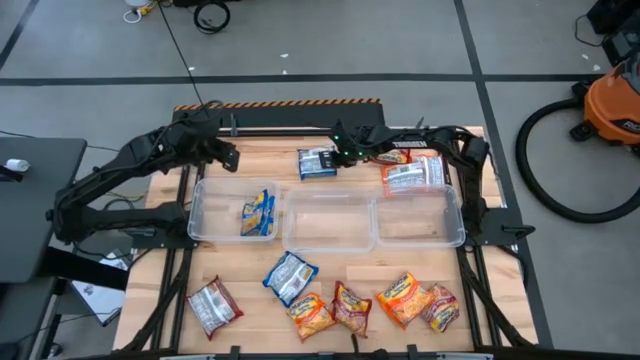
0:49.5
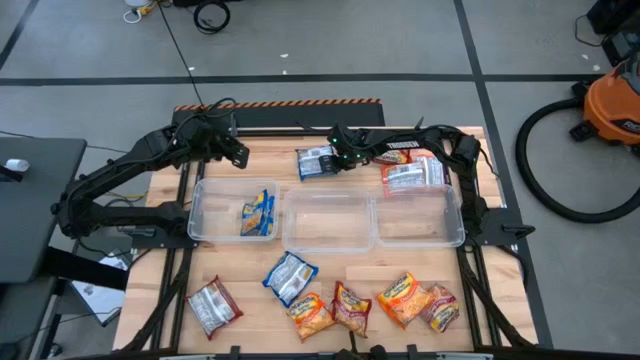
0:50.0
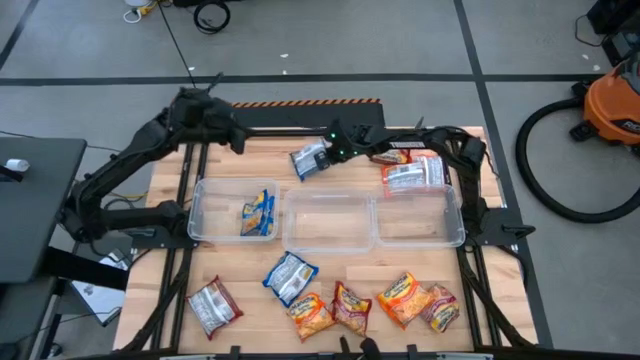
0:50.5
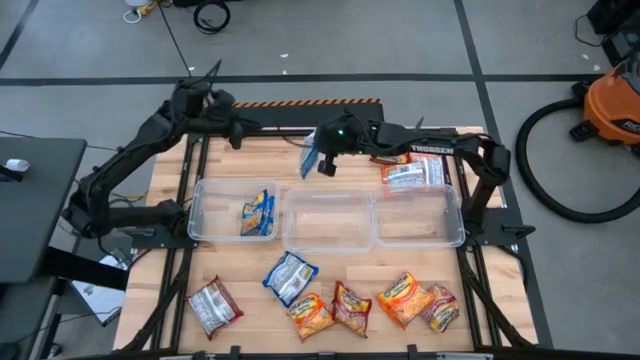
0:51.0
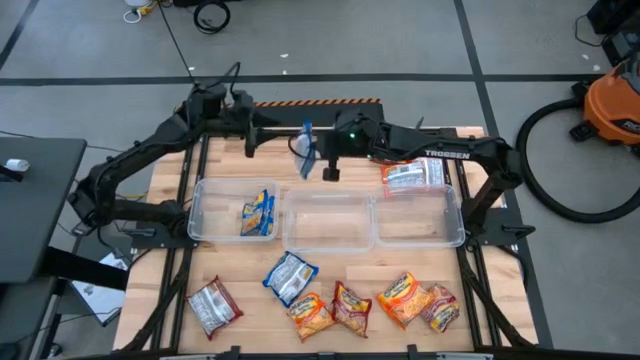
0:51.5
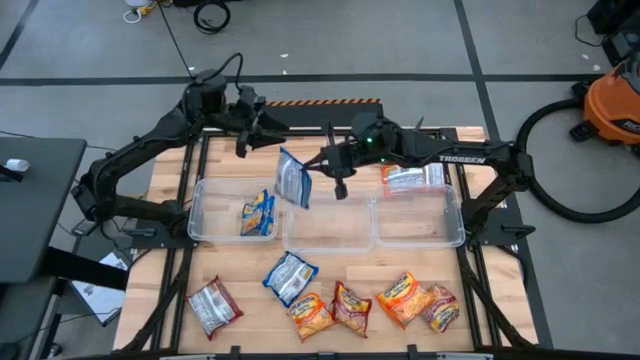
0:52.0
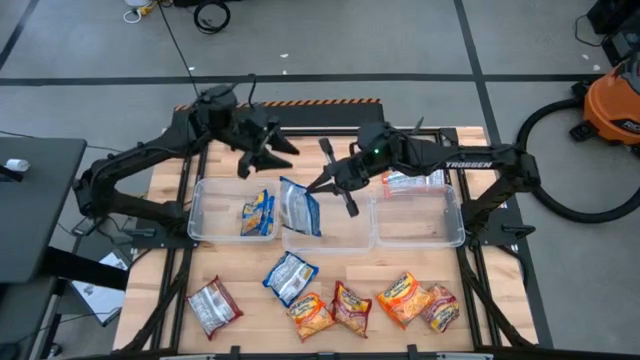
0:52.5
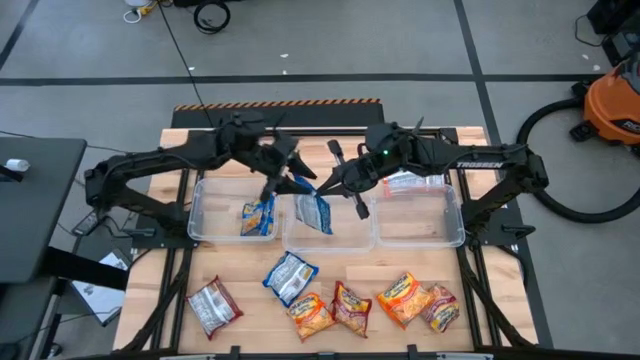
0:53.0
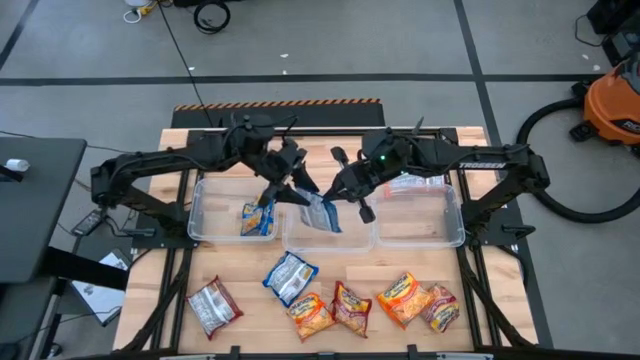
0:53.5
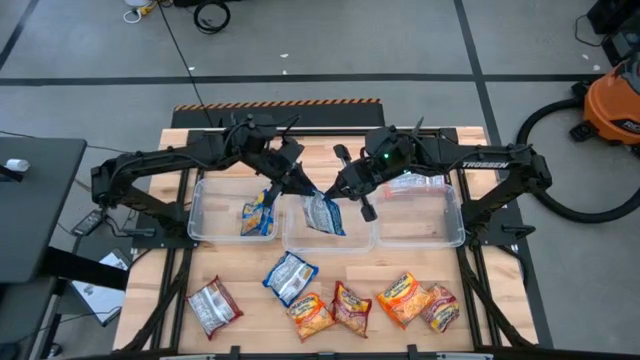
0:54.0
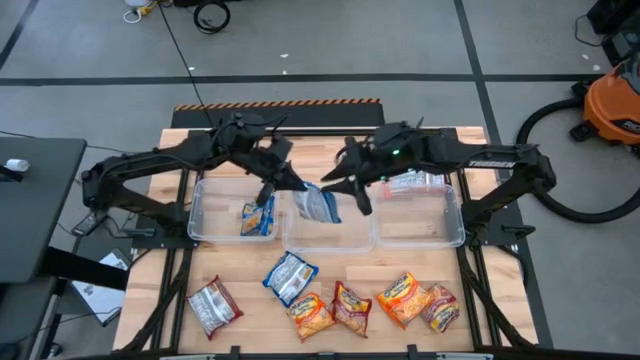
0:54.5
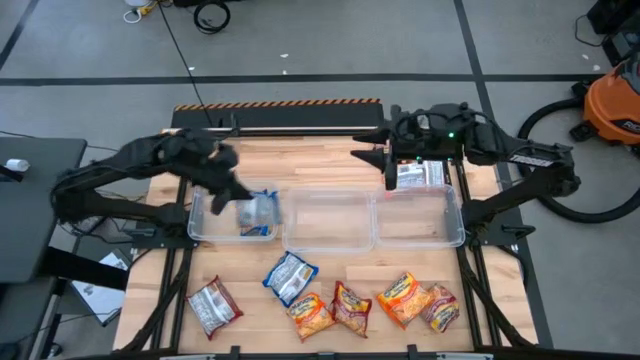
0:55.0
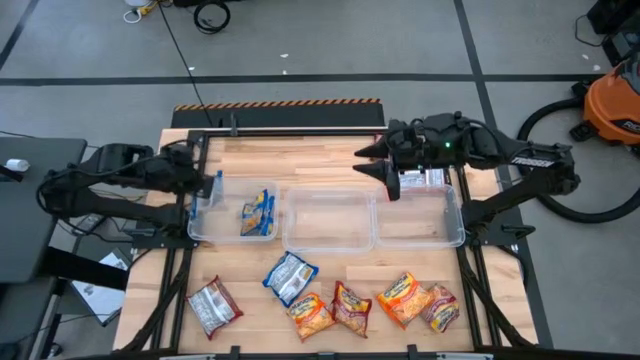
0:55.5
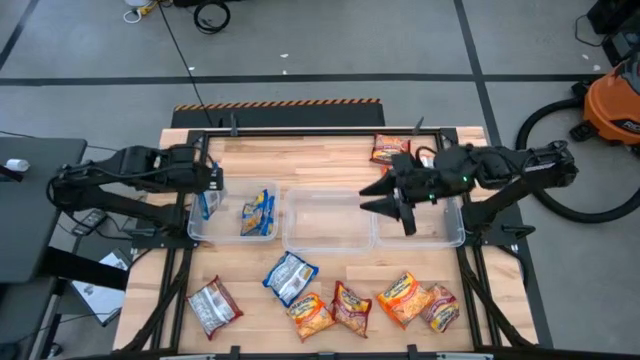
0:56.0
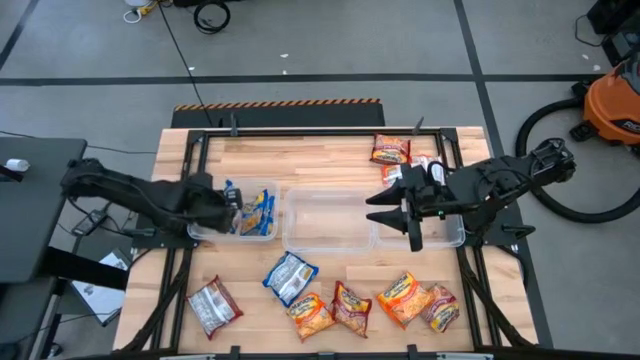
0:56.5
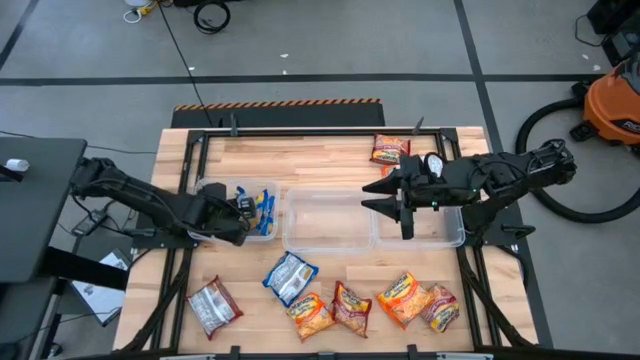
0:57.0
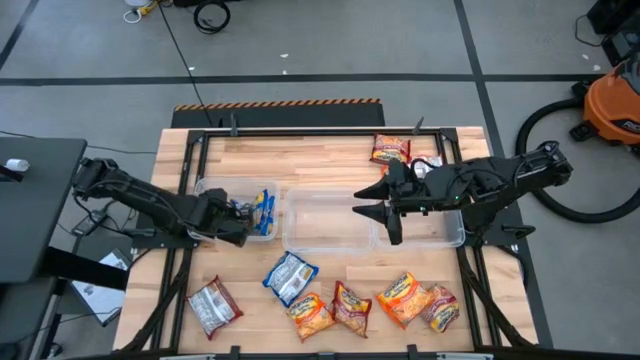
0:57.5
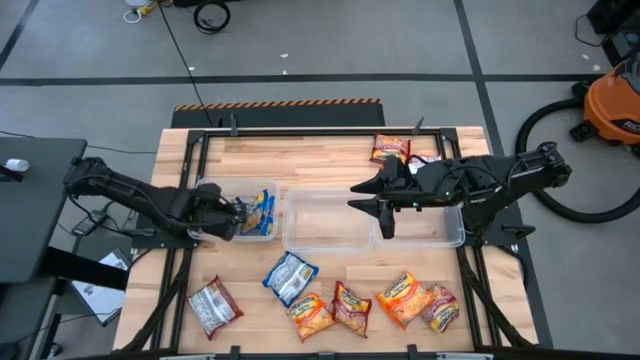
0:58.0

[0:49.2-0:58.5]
Task: Sort Maruchan noodles
Put the blue noodle pack into the left transparent bin

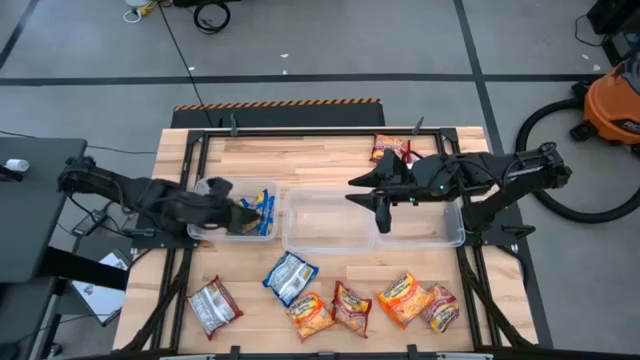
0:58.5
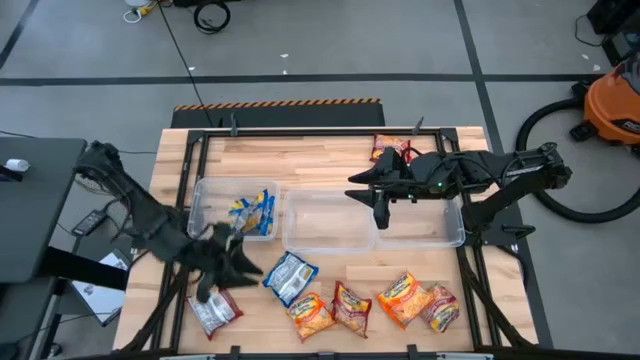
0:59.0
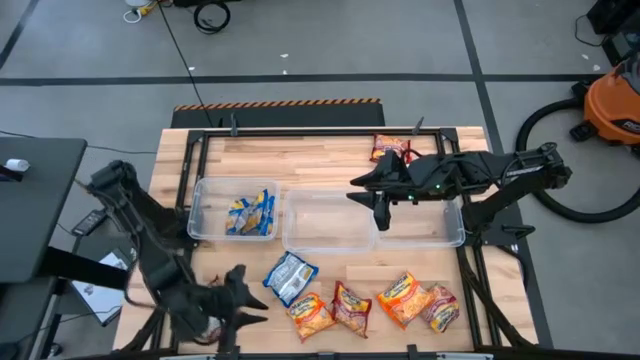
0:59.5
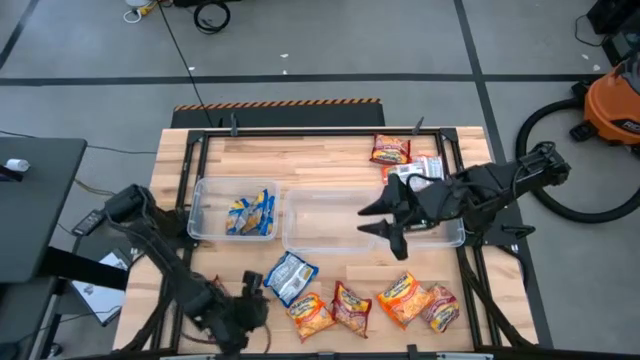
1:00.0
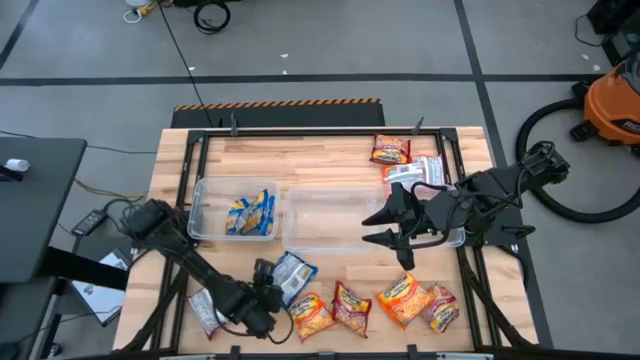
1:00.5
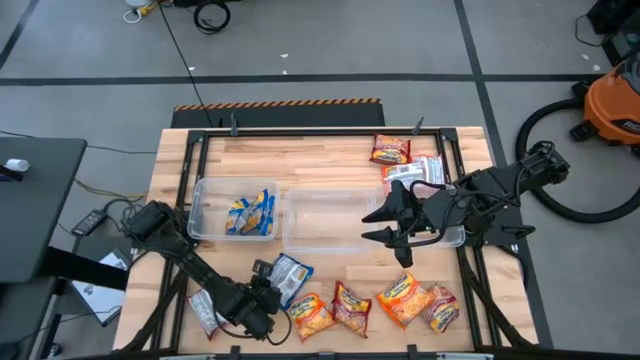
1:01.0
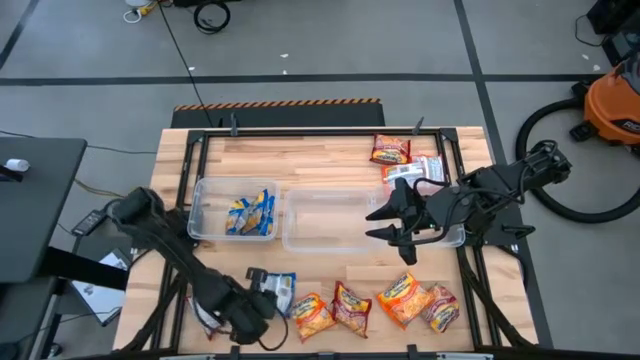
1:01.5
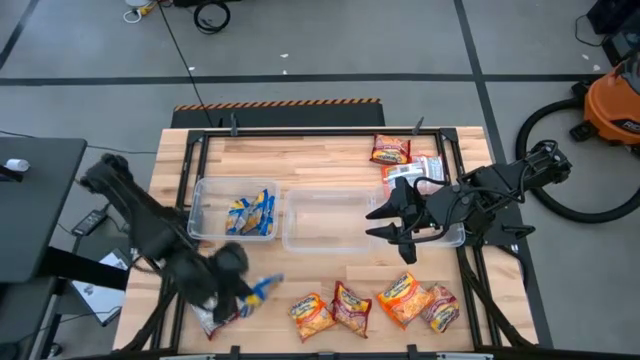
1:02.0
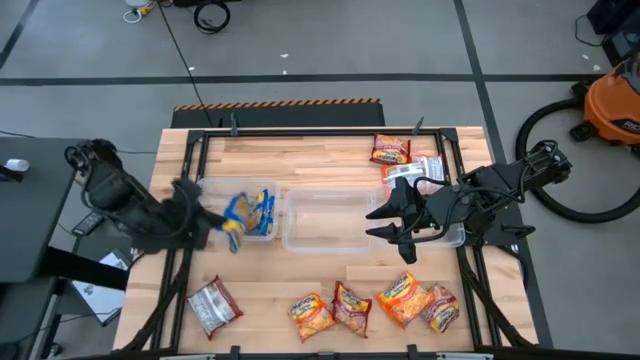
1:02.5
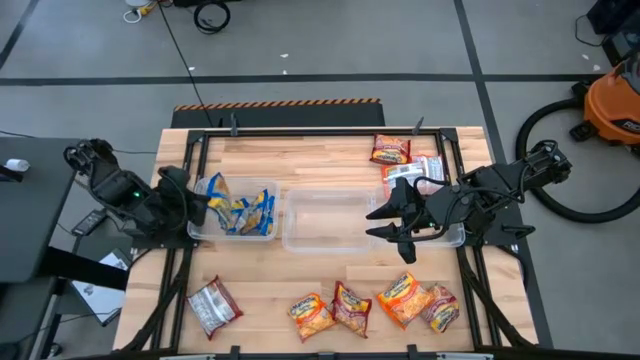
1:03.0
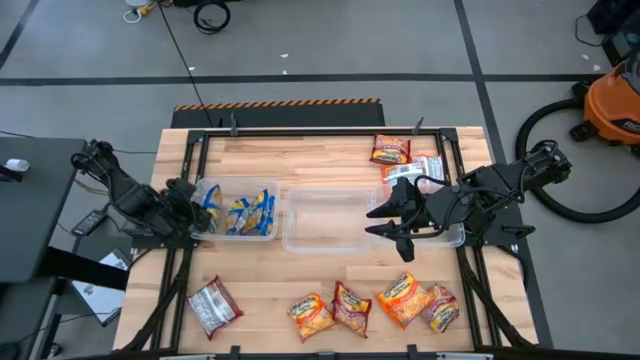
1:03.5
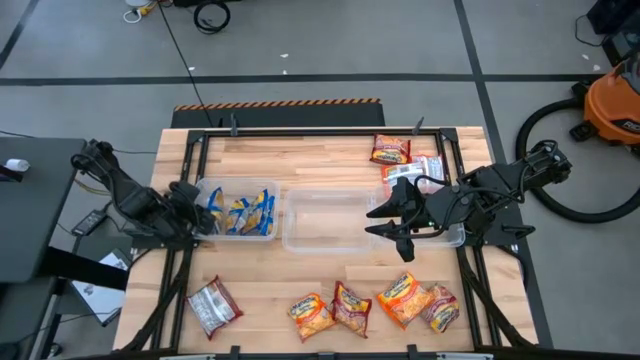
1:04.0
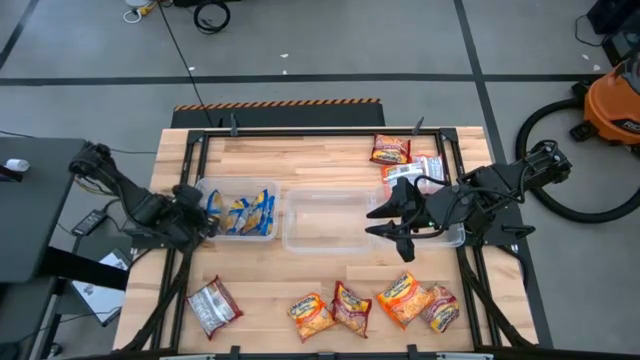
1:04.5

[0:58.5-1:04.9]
Put the blue noodle pack into the left transparent bin

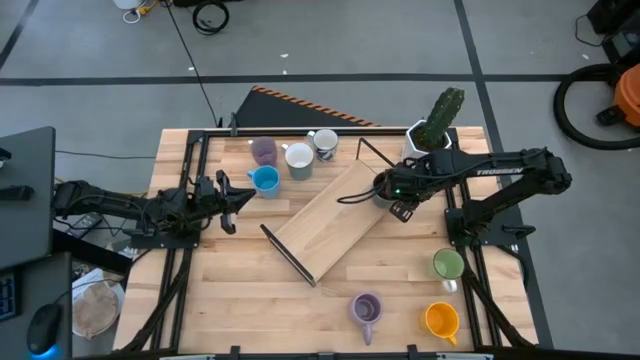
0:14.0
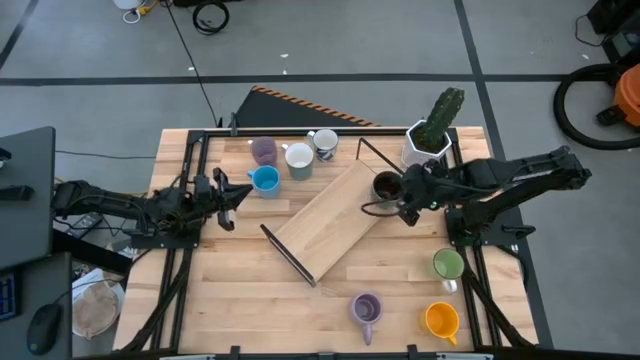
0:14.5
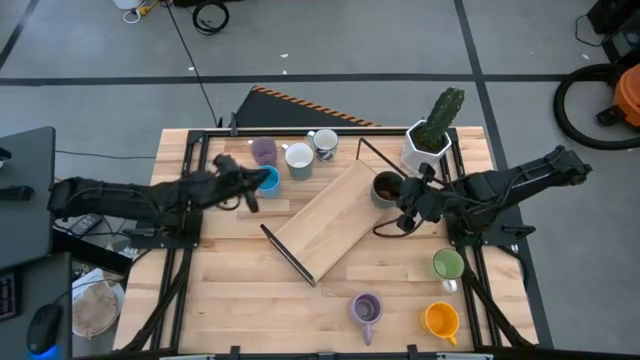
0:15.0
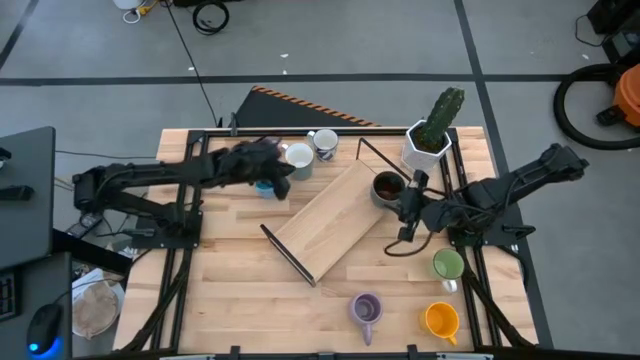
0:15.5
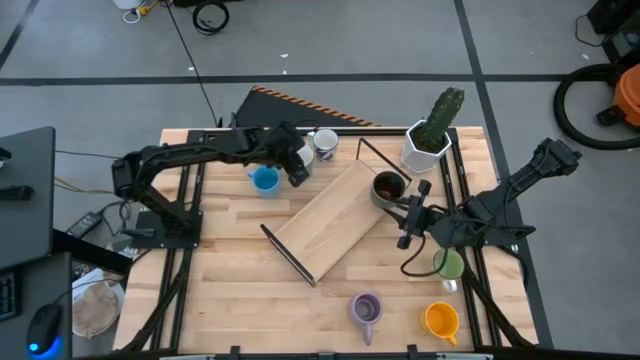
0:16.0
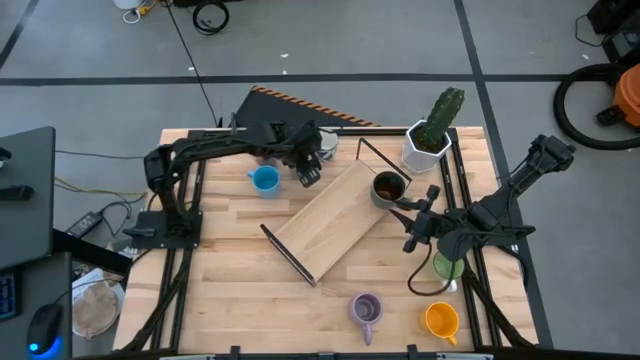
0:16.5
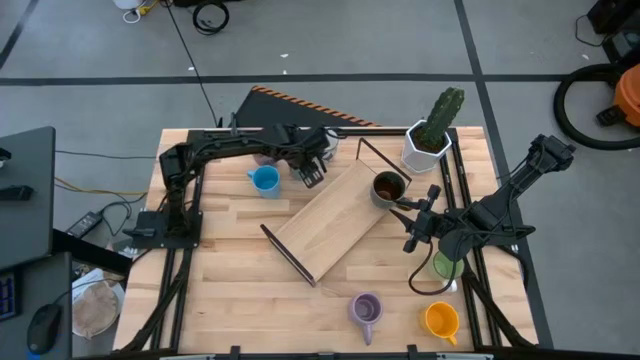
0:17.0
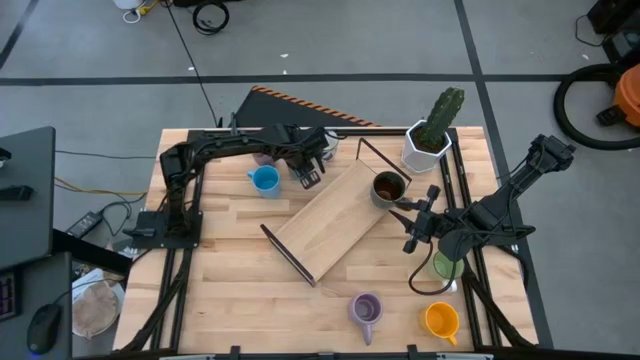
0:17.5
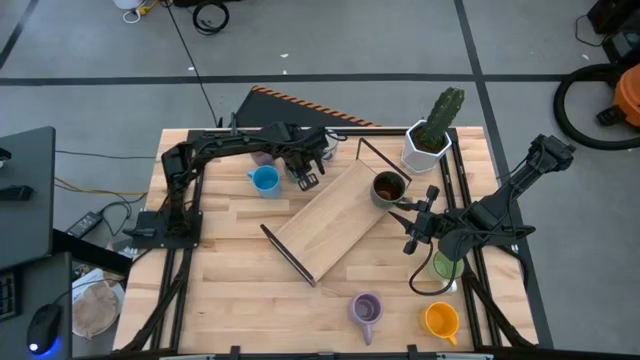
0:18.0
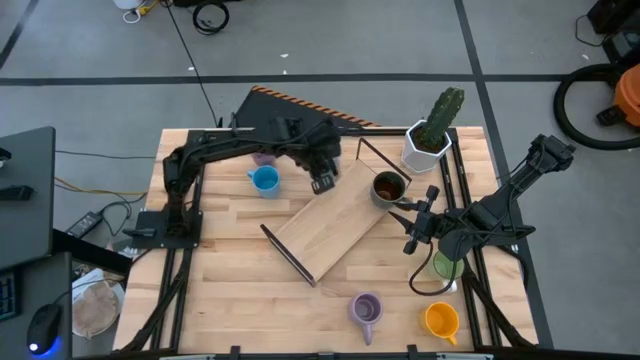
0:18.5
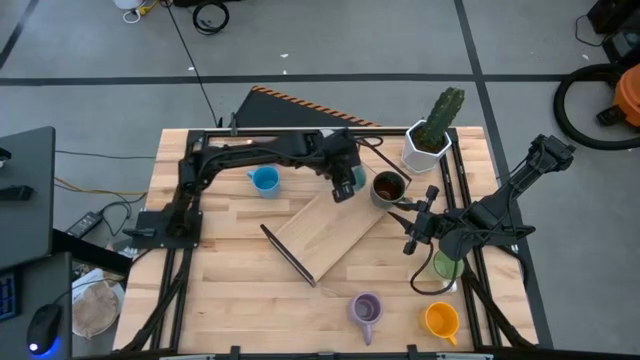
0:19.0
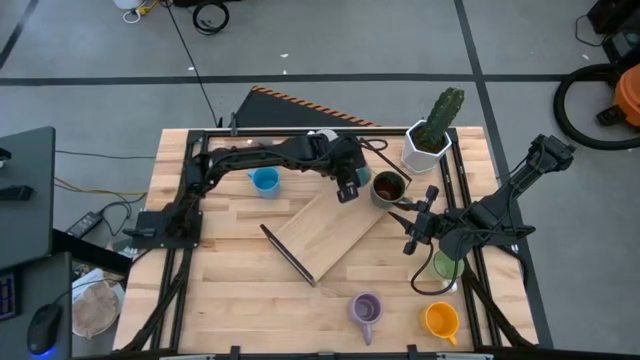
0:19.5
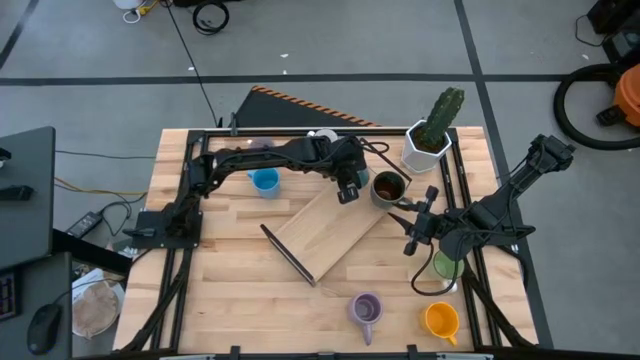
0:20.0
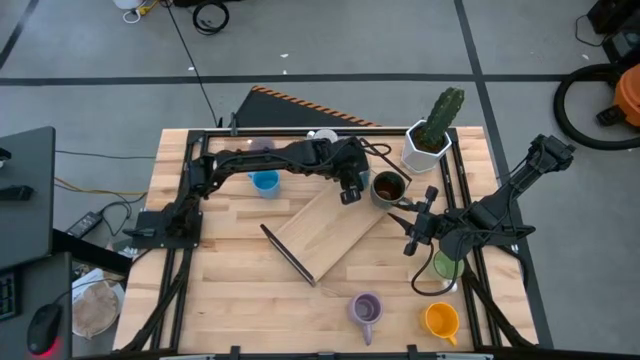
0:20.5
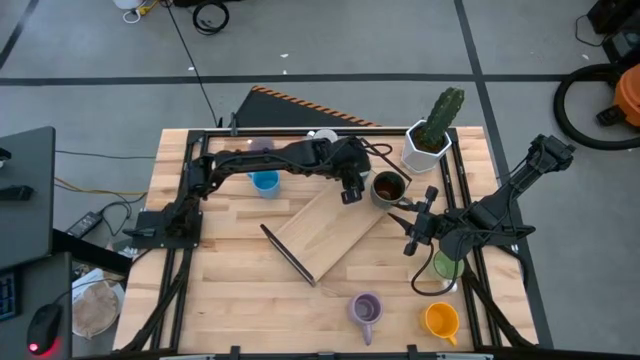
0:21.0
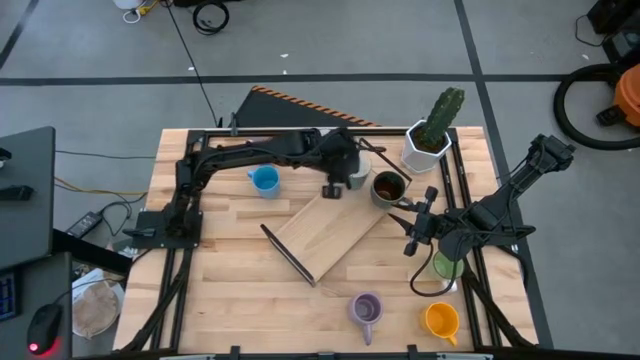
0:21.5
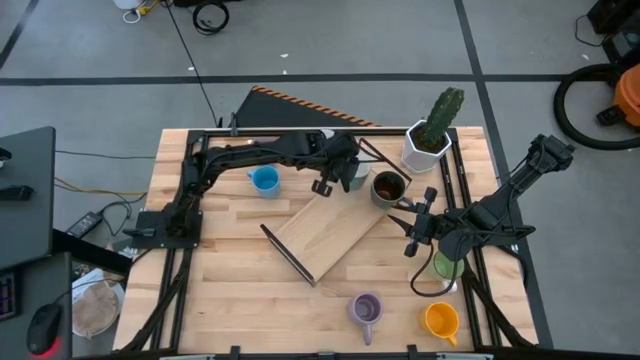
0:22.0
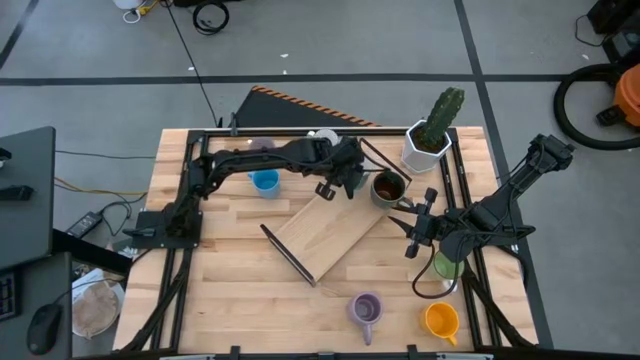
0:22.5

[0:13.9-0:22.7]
Task: Place coffee mugs
Put the green mug on the shelf
